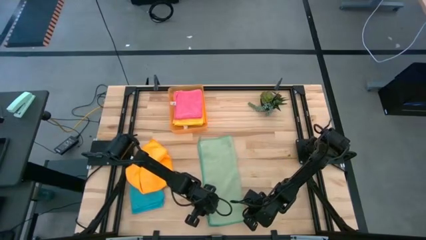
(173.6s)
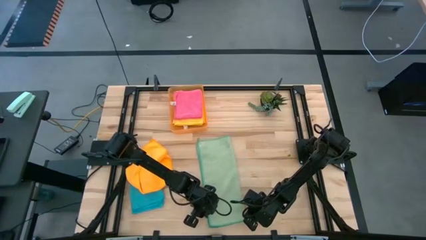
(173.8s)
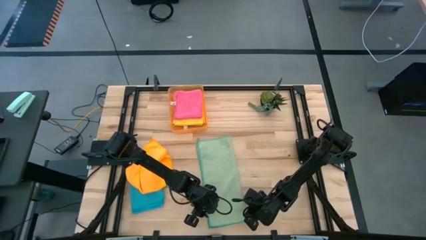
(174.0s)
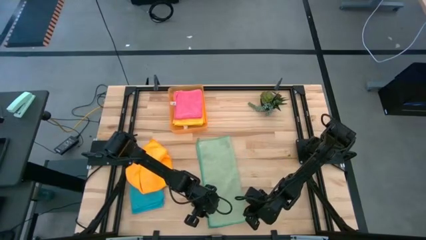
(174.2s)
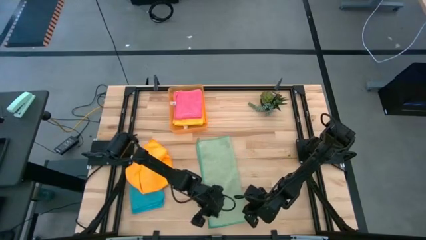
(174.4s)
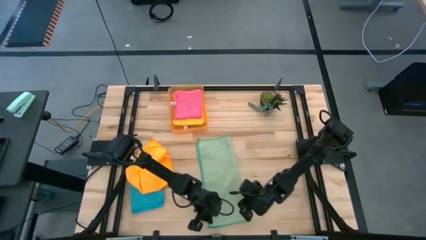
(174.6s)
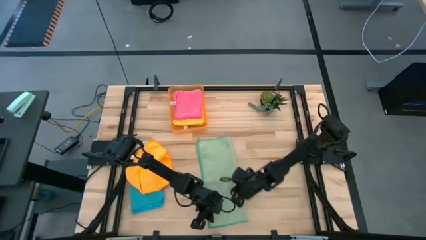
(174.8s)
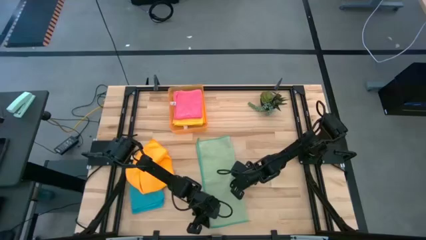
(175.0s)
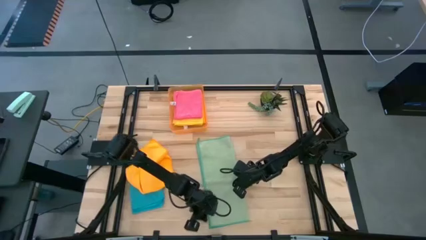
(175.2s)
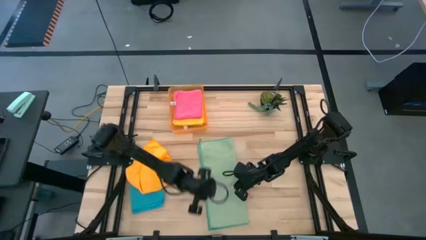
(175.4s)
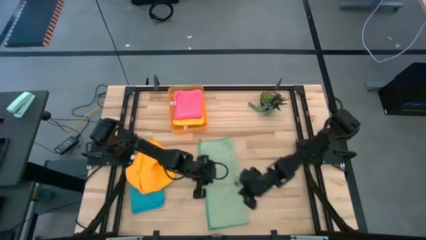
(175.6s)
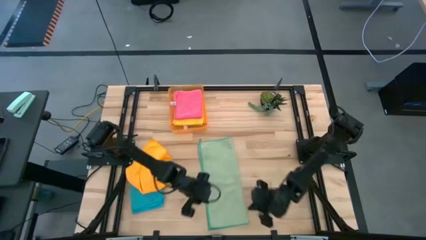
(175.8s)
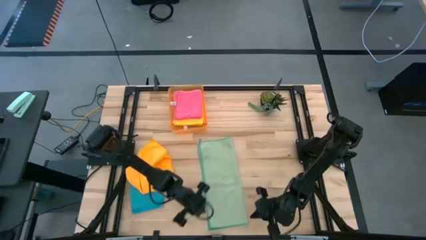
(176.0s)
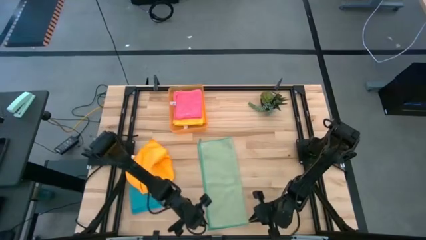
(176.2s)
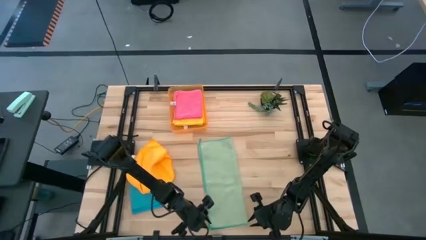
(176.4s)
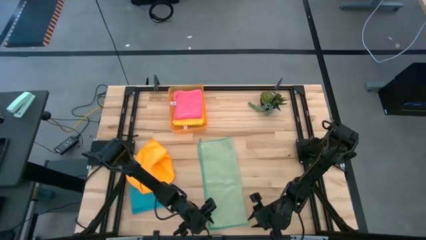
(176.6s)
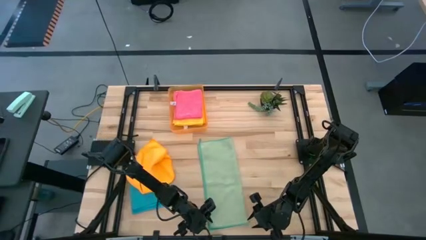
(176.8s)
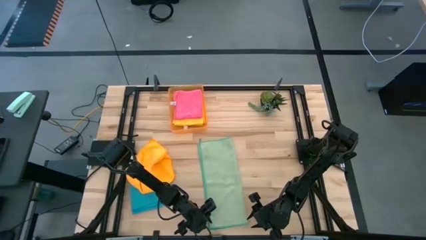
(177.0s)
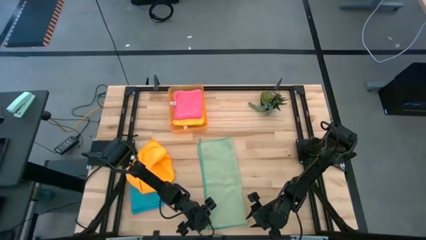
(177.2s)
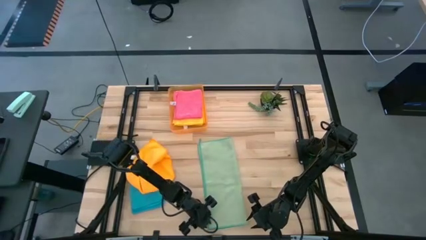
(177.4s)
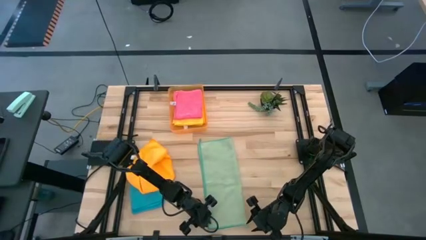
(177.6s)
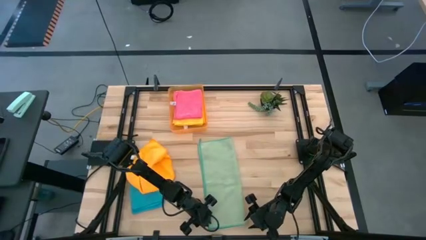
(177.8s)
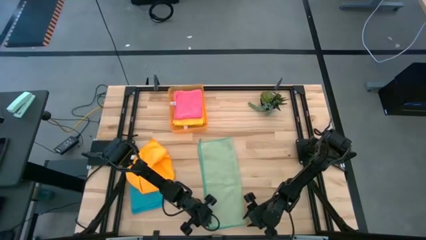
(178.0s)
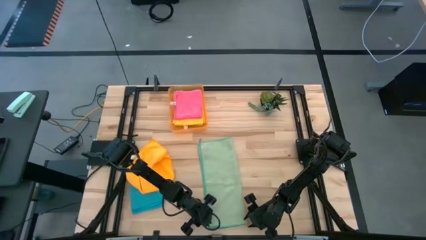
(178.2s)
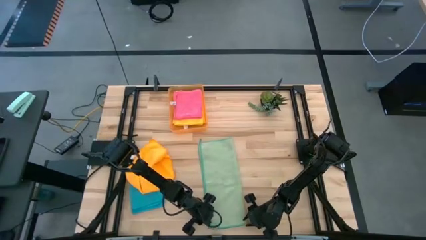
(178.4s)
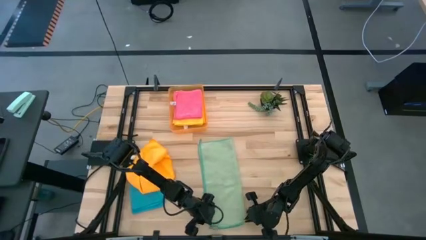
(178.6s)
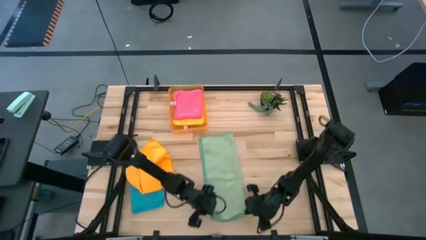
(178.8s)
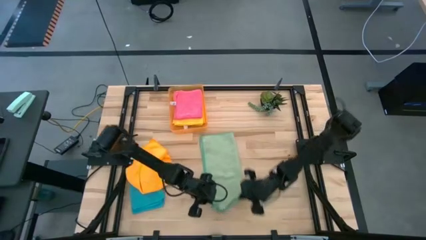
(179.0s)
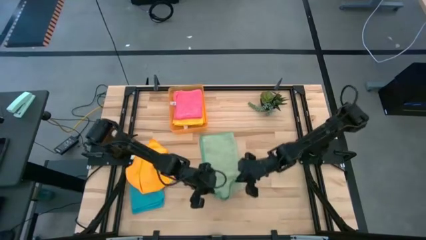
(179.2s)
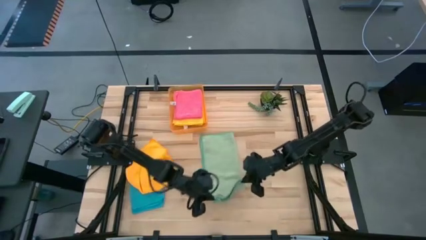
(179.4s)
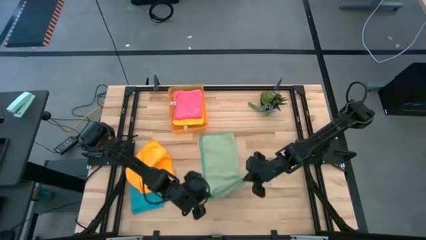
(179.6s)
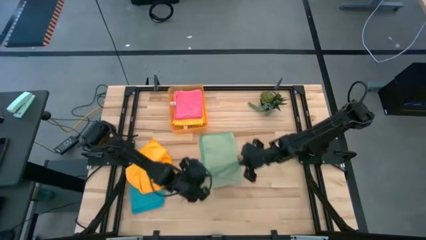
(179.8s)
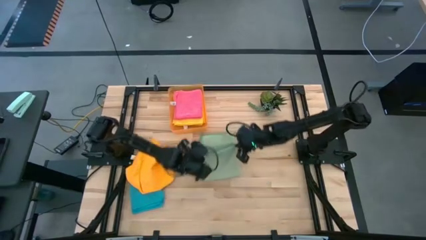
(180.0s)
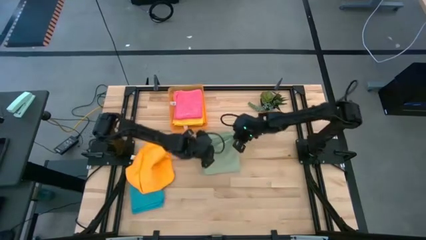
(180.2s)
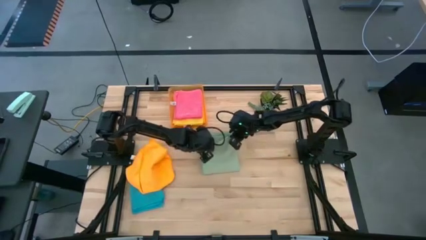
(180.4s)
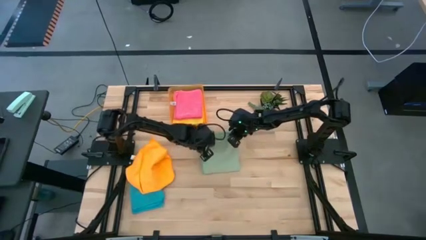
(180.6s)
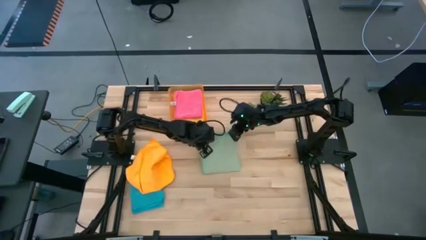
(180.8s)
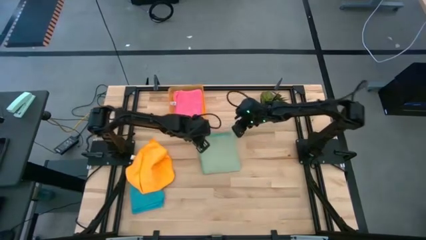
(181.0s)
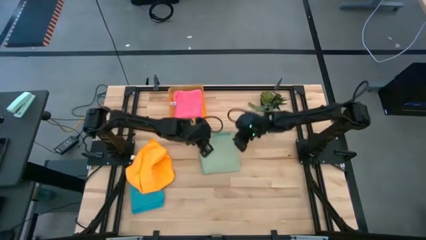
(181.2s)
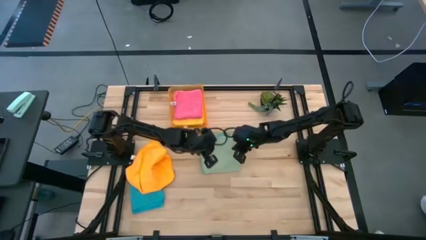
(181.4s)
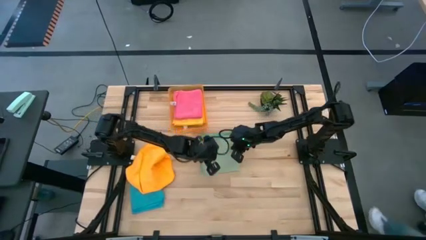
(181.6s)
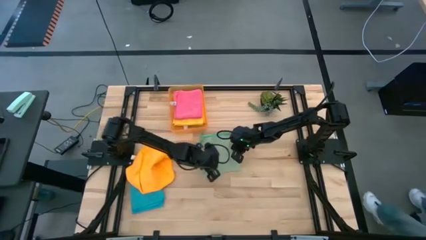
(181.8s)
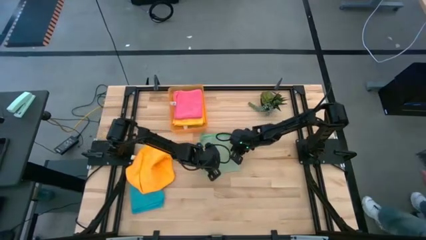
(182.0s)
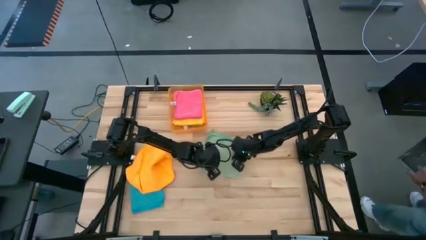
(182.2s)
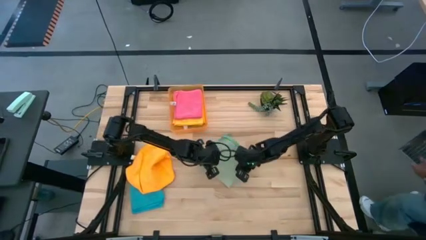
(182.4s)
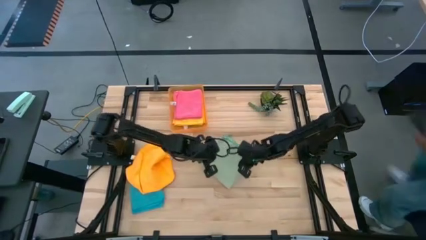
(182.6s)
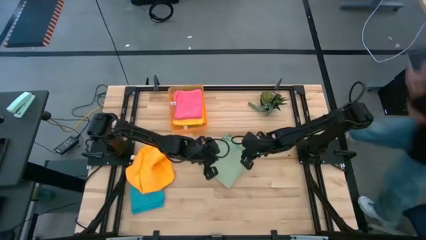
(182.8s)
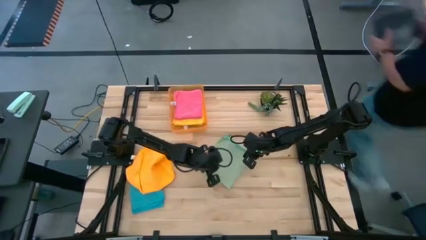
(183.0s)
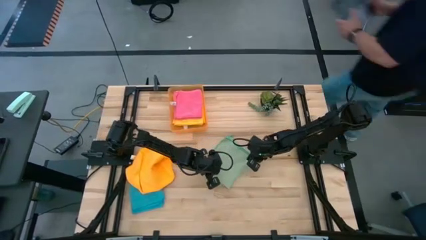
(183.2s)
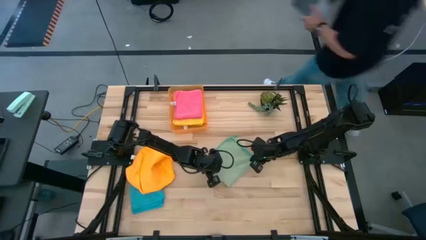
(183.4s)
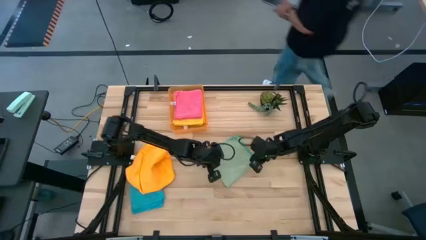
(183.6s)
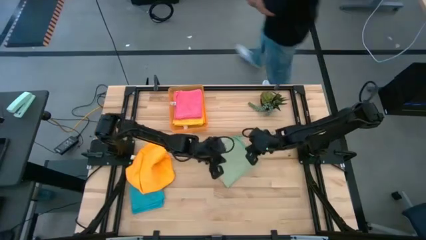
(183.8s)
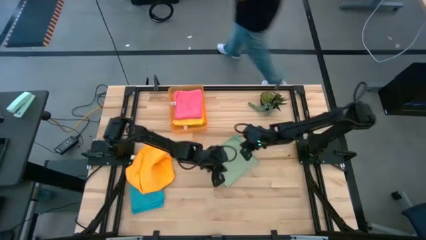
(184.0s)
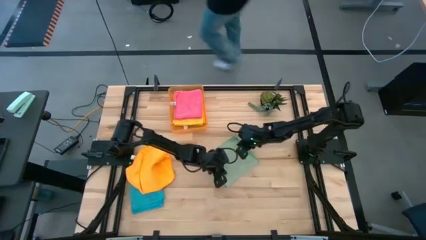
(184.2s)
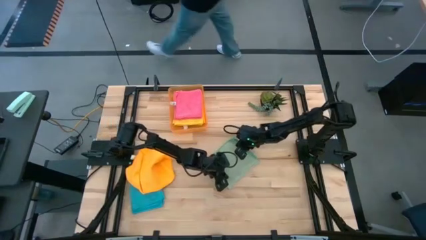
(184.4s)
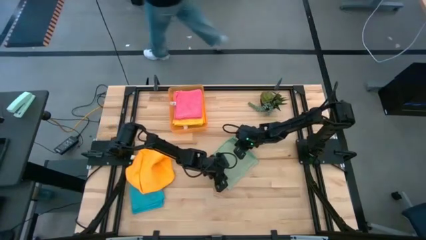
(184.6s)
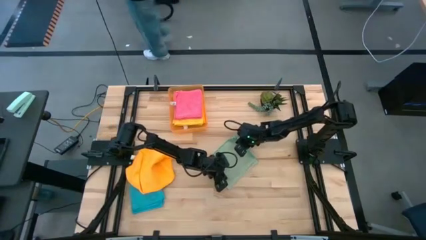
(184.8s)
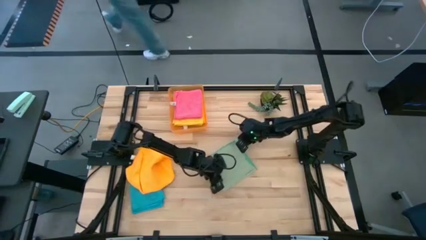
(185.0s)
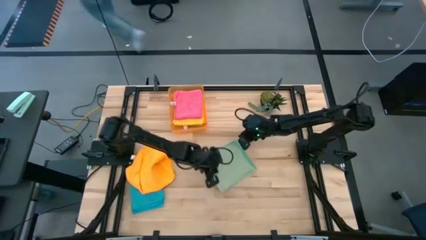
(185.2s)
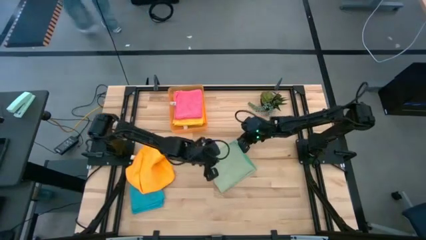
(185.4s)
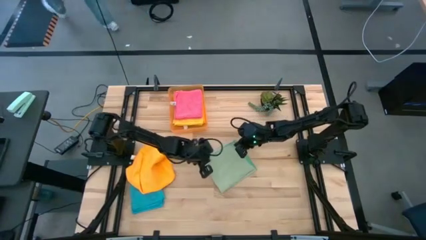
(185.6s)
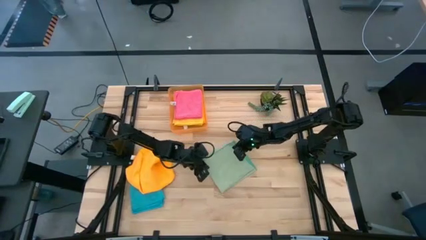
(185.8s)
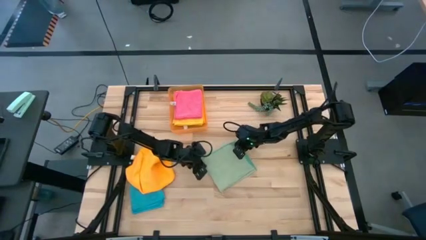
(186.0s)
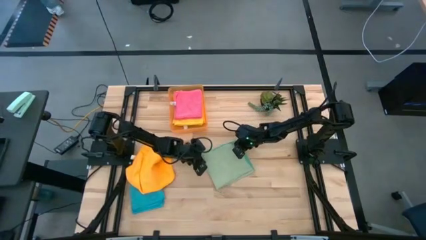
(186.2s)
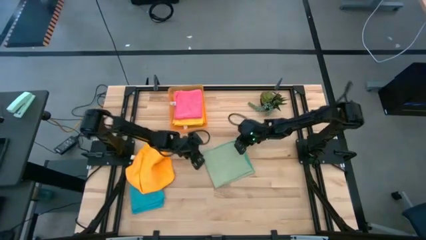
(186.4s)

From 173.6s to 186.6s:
Task: Fold microfiber towels
Fold the green microfiber cloth
